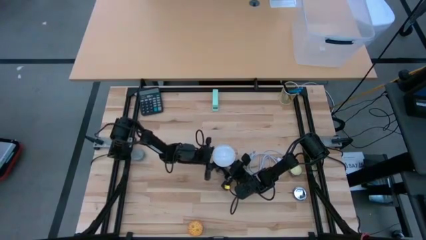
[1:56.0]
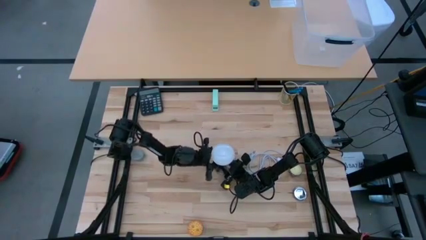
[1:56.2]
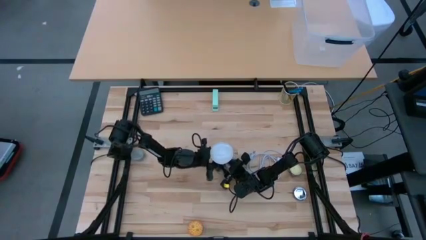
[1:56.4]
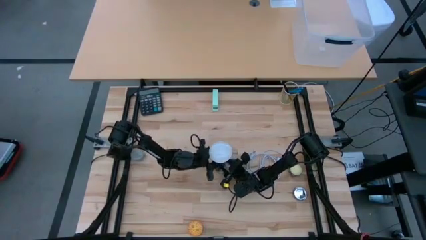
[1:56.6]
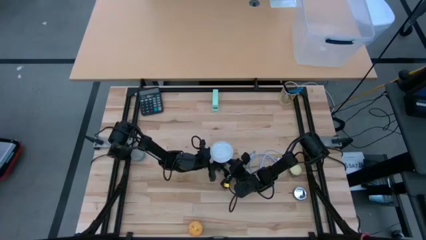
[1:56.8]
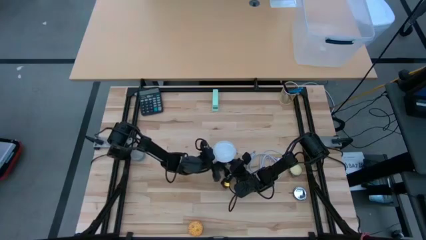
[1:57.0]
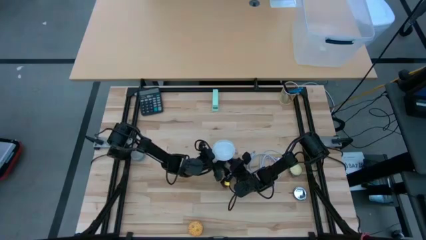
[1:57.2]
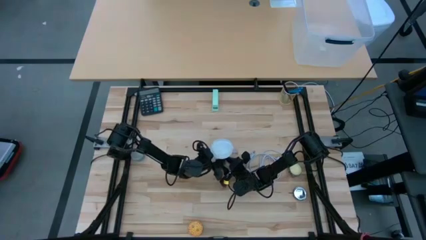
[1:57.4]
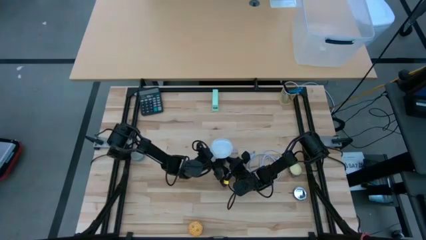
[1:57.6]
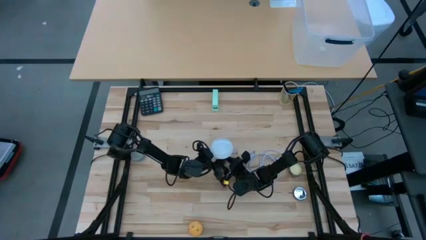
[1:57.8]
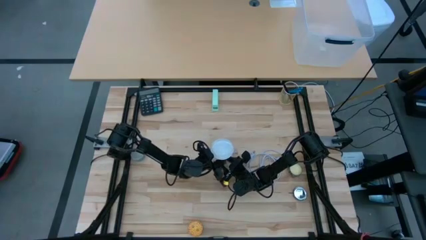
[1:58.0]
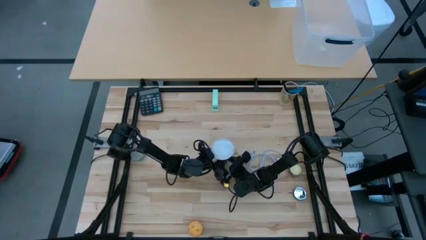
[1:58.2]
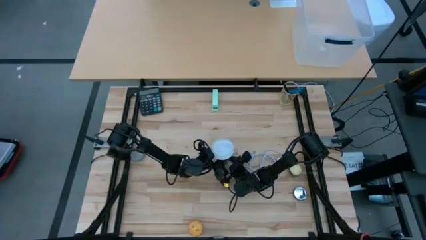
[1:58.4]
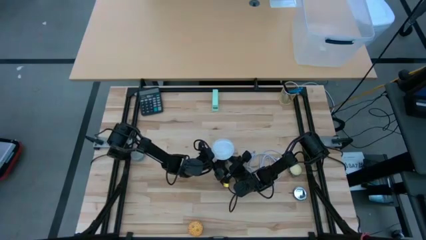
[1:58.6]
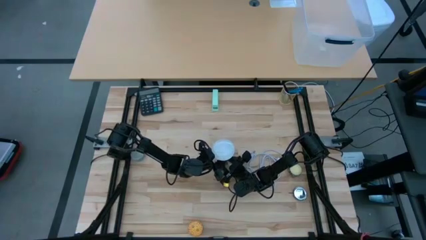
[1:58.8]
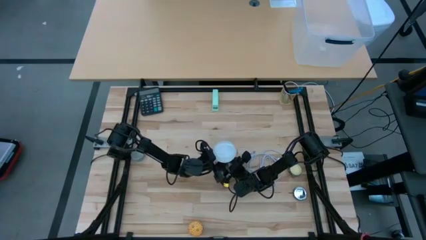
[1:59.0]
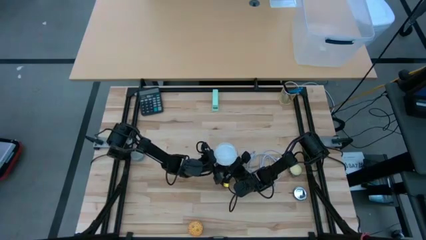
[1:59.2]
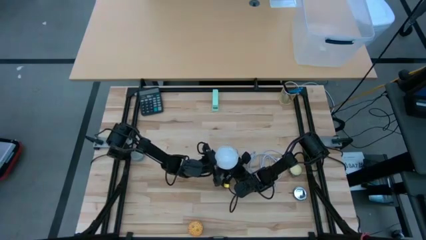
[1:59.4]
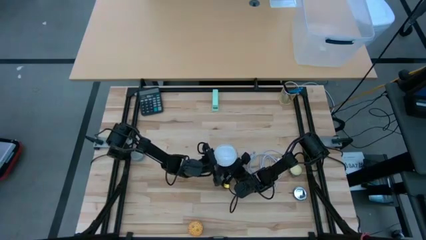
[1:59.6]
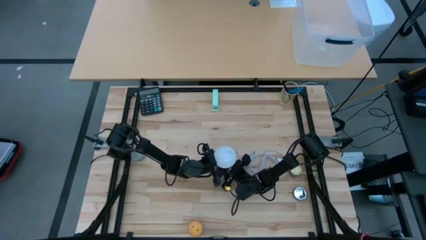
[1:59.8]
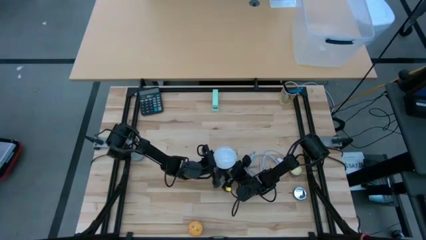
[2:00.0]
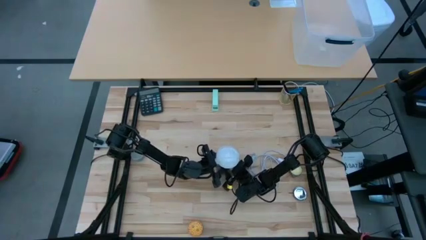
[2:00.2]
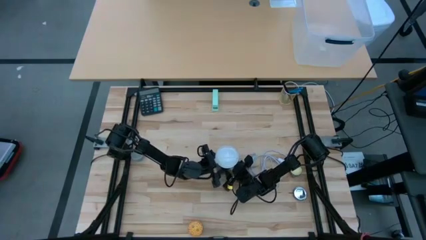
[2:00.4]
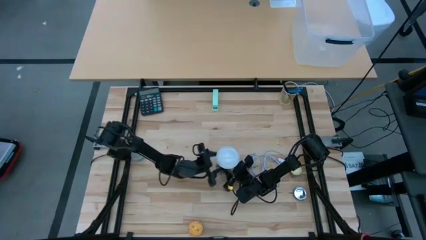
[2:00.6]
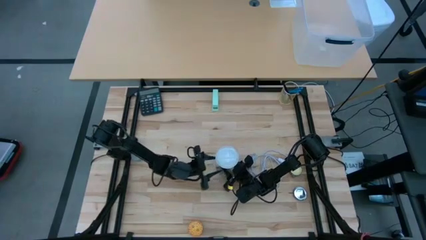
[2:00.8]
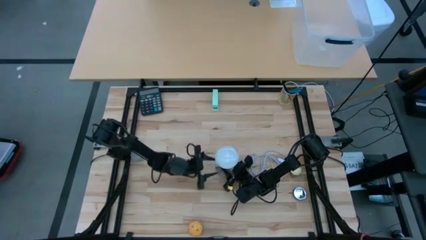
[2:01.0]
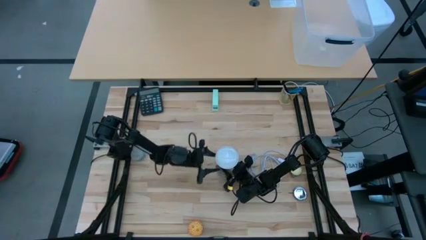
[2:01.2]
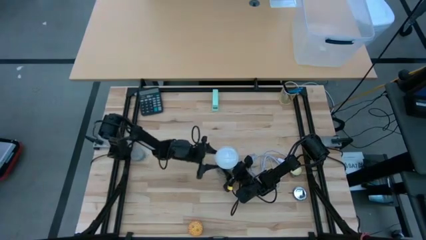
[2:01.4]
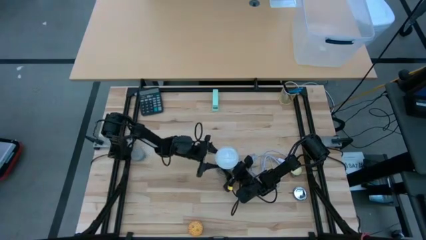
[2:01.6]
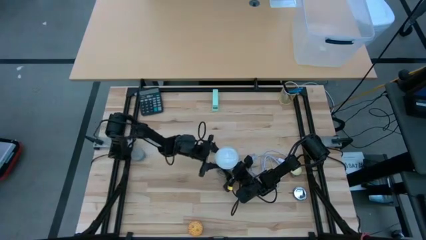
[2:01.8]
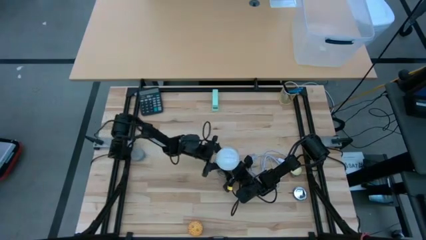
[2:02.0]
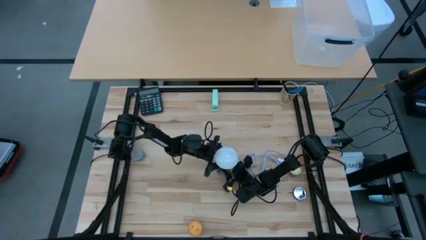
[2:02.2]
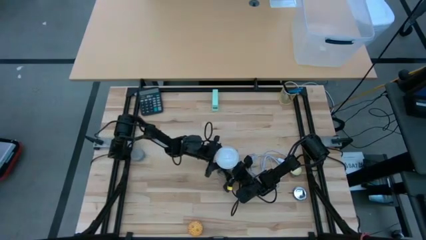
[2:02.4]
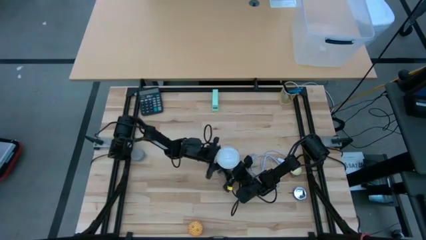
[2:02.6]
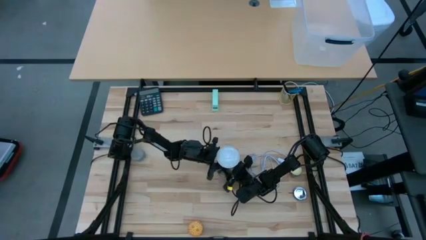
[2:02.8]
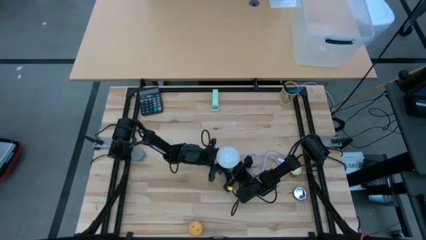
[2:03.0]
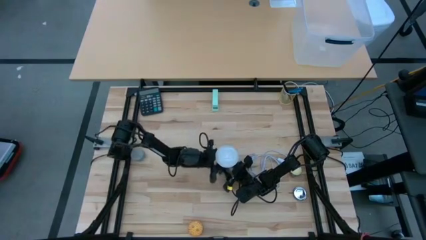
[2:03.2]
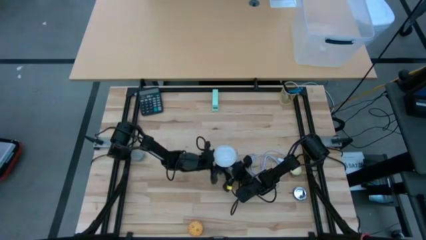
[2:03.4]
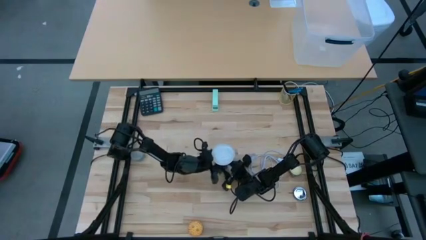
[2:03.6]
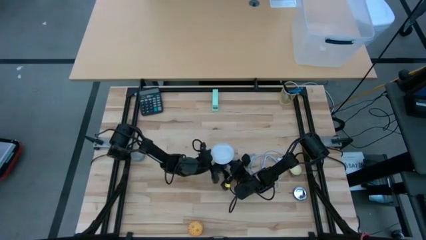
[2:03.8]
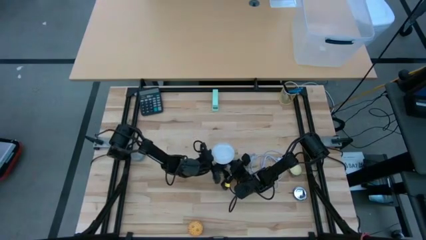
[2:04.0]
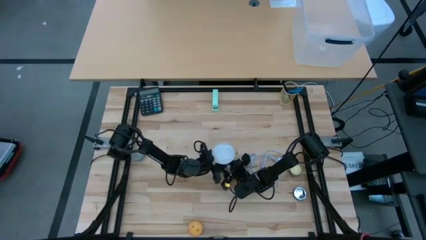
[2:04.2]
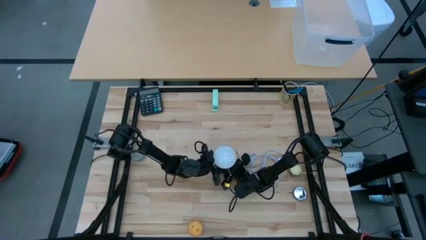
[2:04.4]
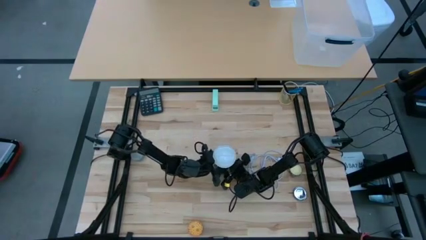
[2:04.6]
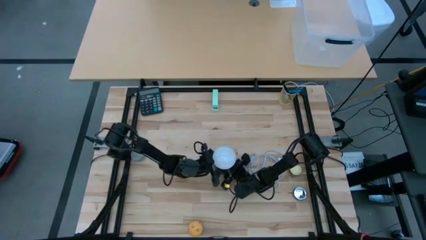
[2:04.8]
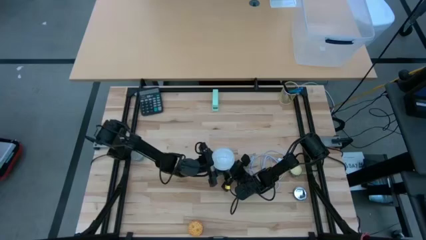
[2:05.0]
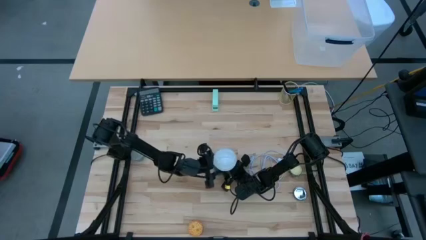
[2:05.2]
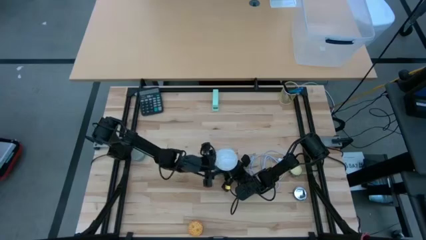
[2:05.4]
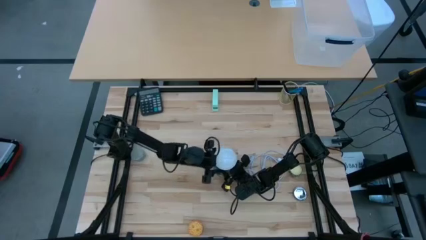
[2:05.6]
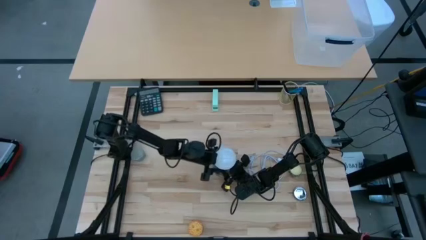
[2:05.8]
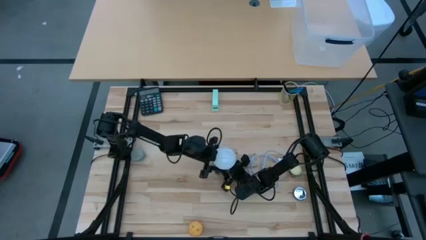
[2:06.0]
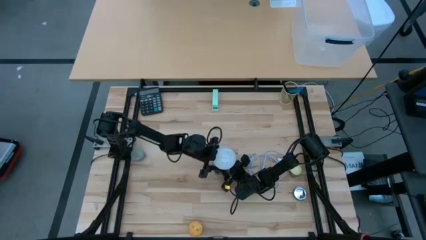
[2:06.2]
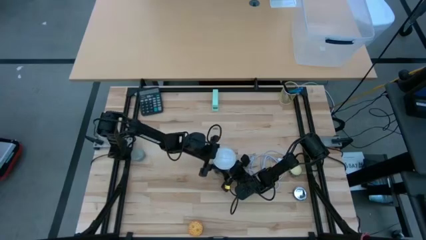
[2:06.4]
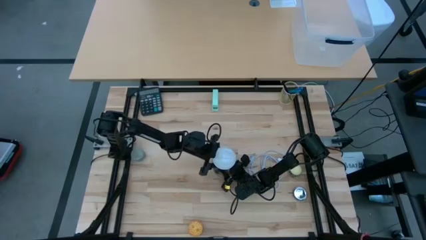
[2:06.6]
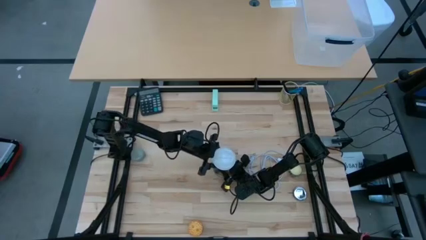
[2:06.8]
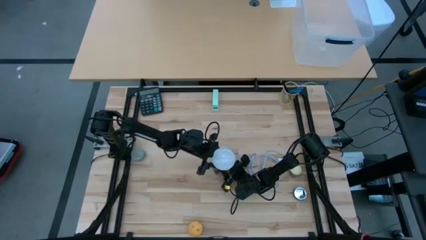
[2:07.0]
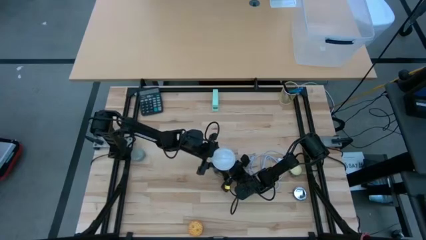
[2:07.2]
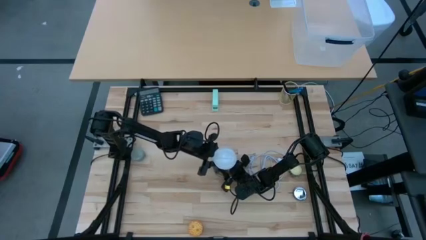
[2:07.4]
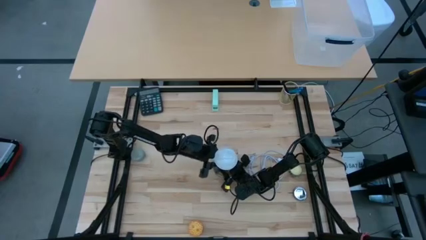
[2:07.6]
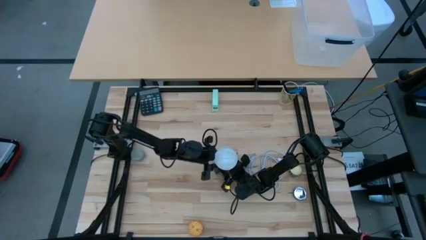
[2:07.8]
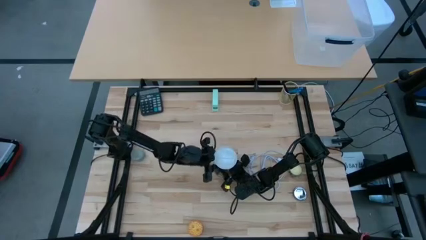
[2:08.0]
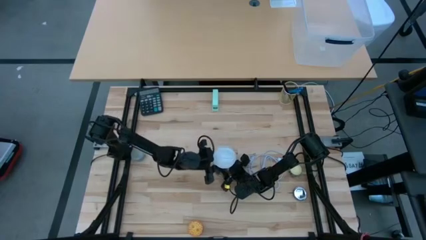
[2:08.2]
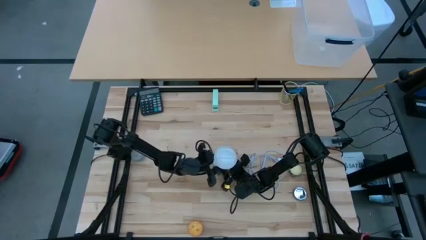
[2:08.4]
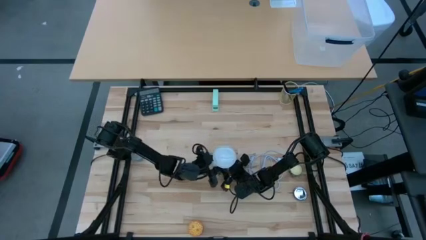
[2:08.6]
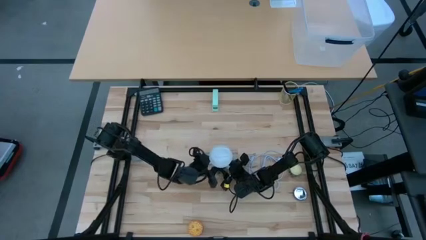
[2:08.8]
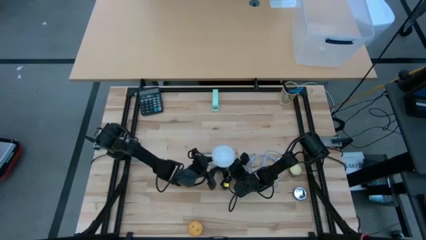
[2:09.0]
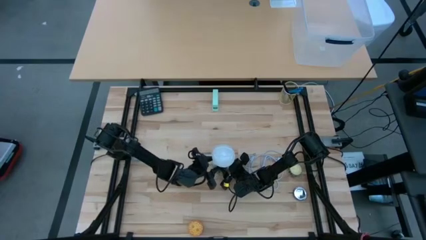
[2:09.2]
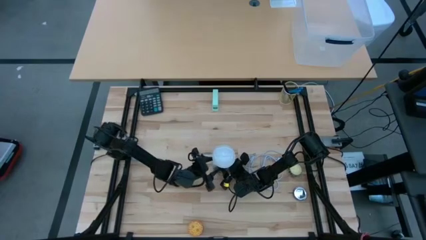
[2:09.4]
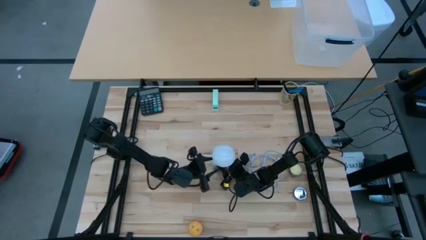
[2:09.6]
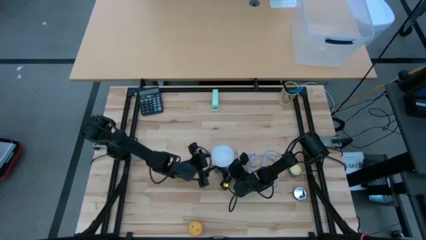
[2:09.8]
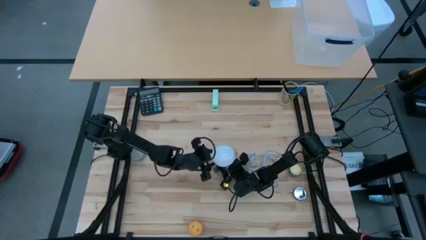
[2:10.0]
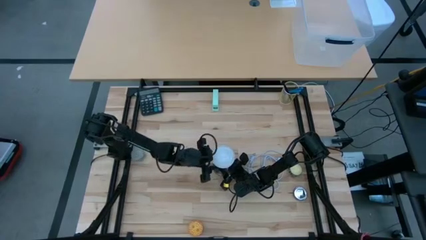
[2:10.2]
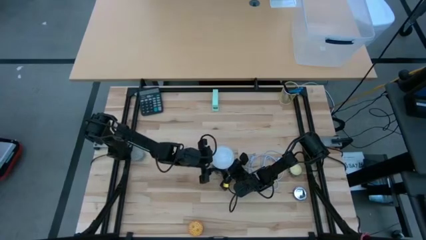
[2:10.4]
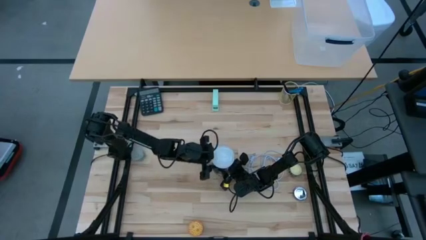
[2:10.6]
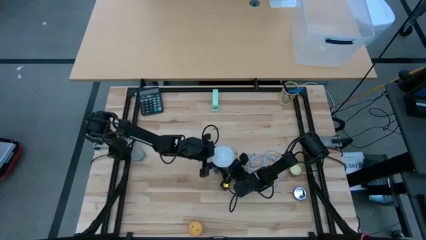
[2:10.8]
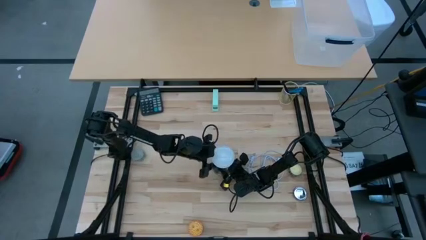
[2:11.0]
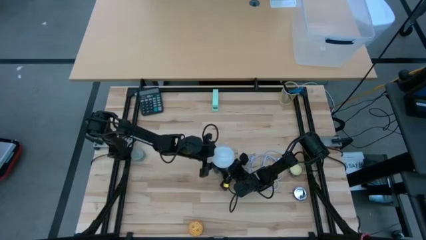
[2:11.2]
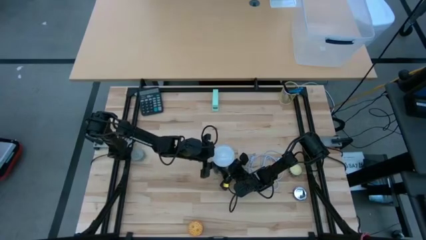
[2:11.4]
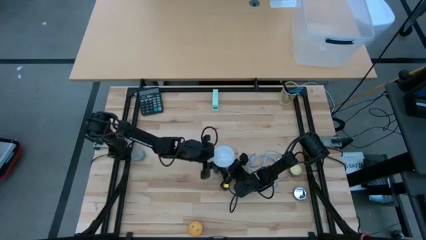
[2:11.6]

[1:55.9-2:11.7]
Task: Screw lightbulb
Remove the white lightbulb from the silver lamp
